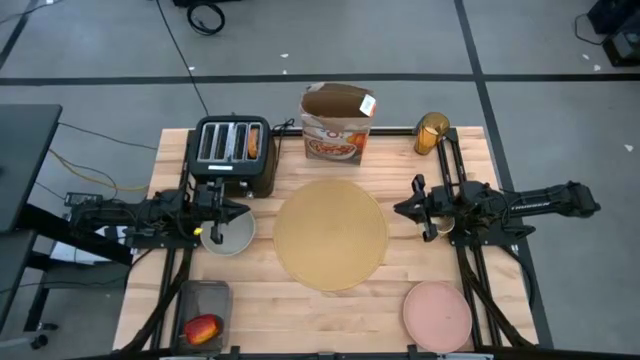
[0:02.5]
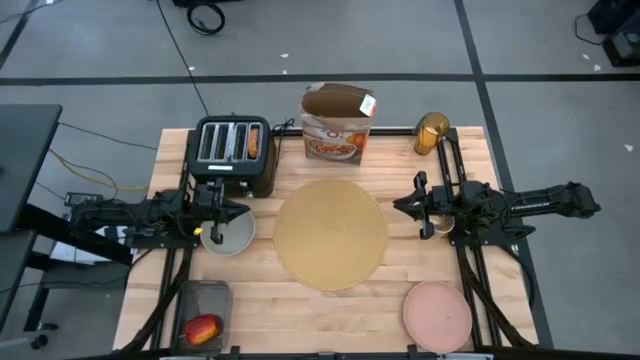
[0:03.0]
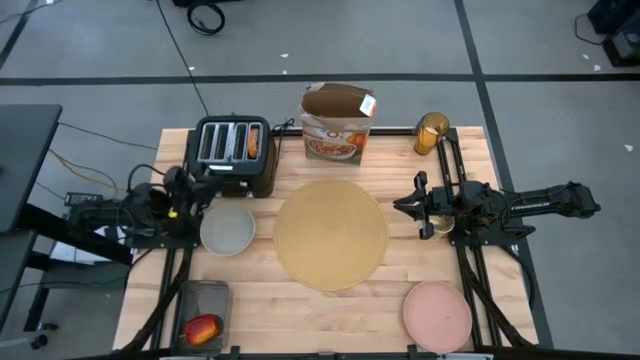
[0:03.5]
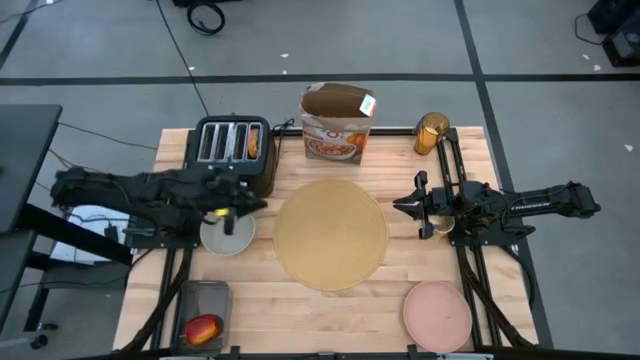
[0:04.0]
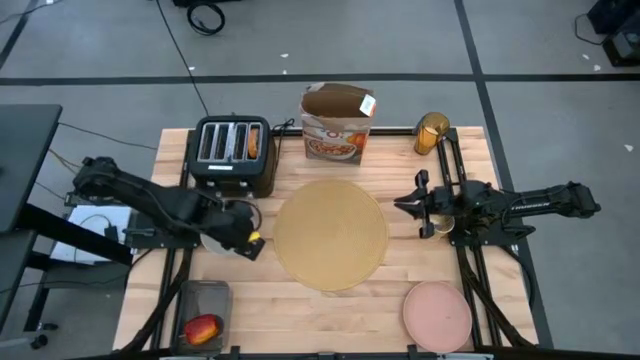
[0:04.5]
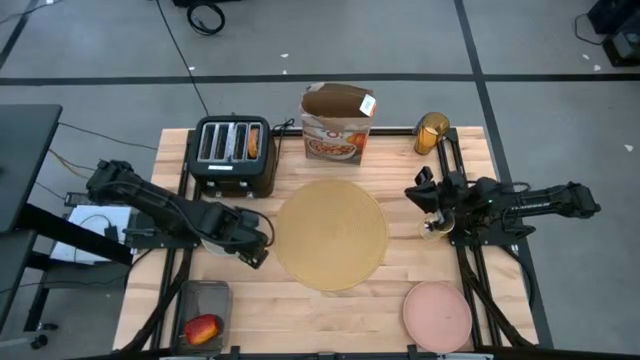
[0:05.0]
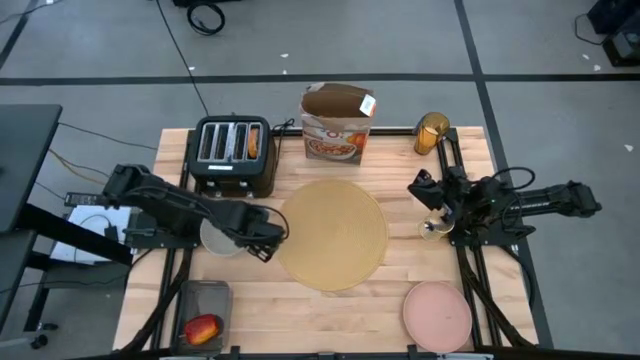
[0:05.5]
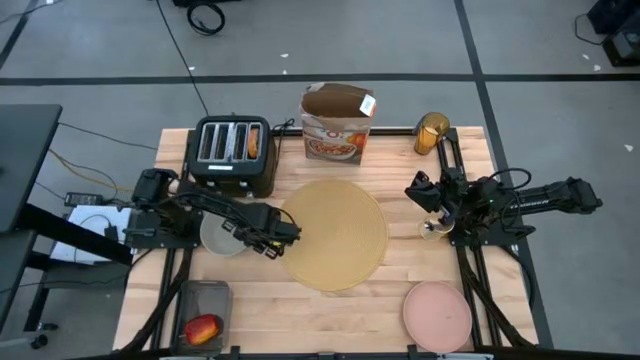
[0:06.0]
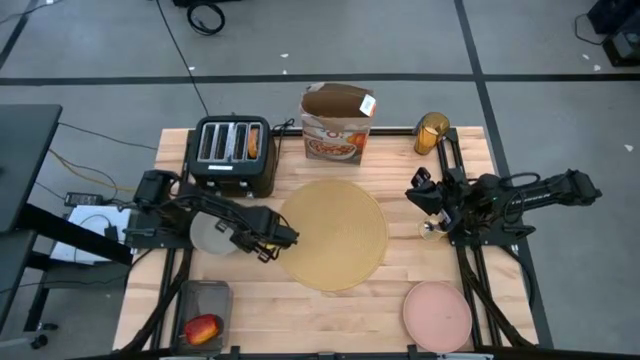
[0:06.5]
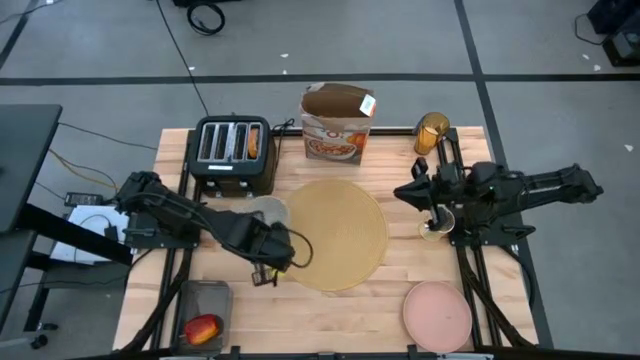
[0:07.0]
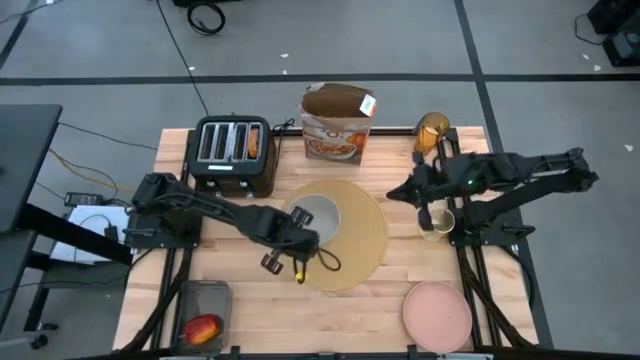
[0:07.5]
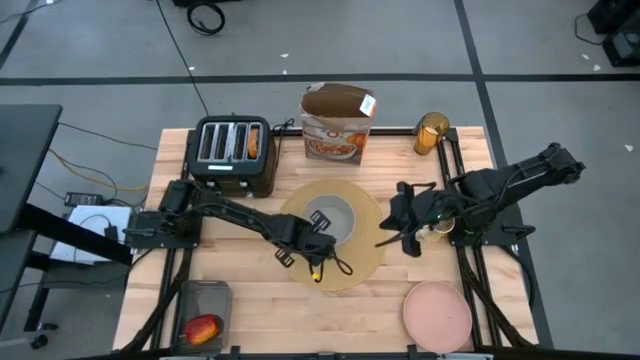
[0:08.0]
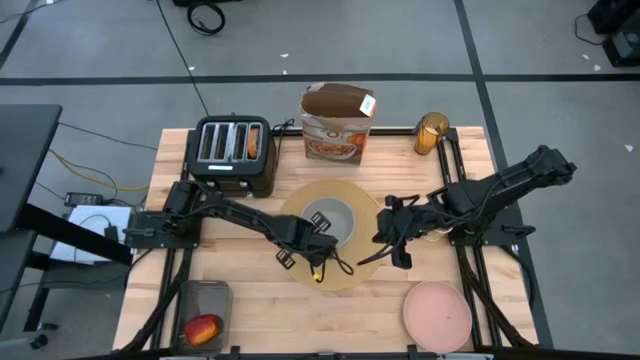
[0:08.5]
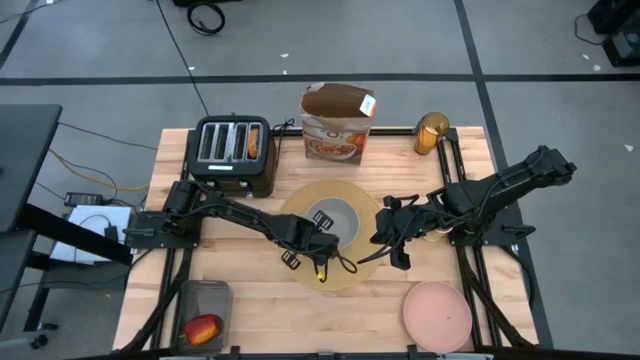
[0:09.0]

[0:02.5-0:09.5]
Task: Arrange a breakfast setting
Put the gray bowl on the brown table mat

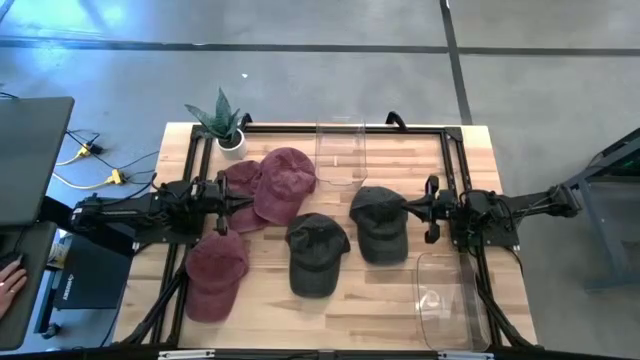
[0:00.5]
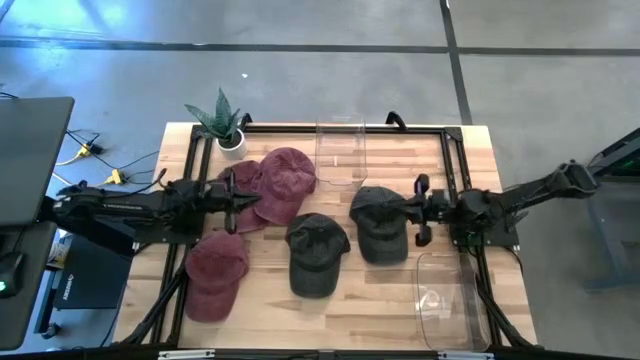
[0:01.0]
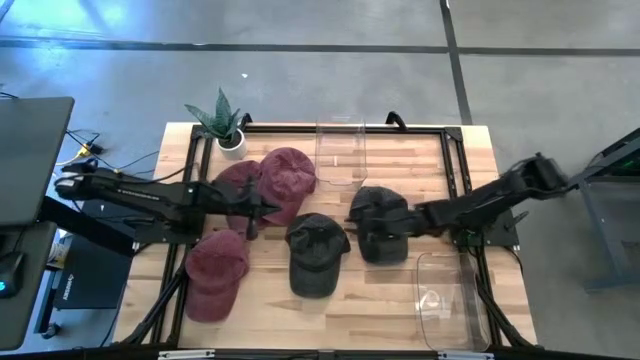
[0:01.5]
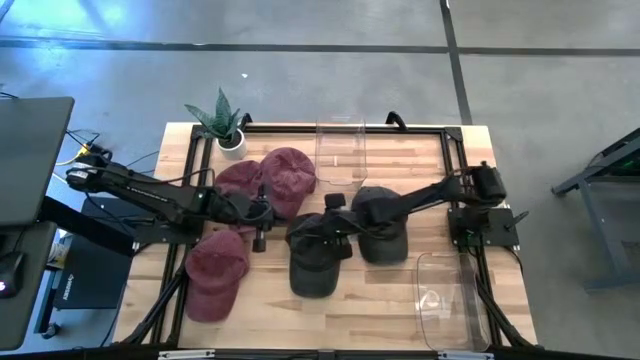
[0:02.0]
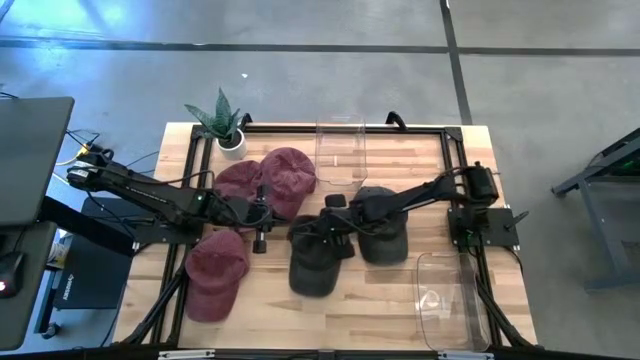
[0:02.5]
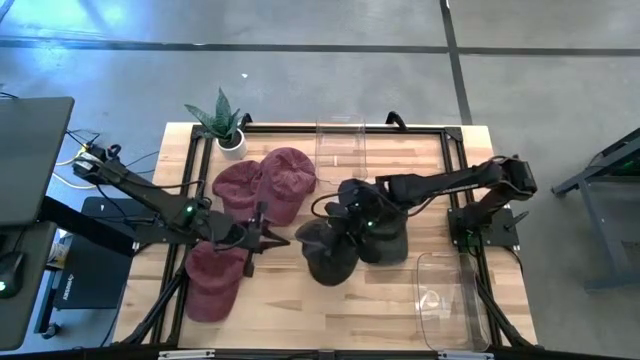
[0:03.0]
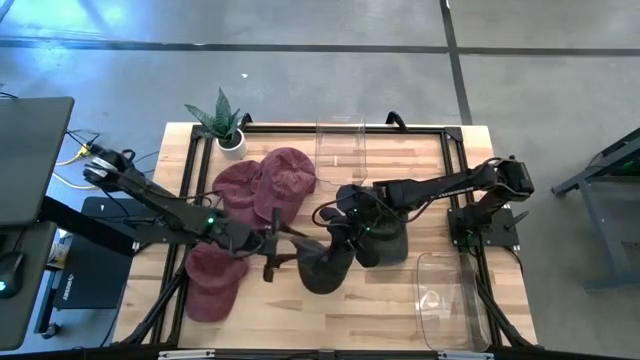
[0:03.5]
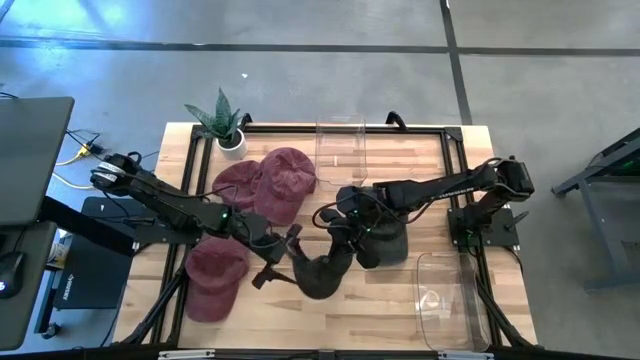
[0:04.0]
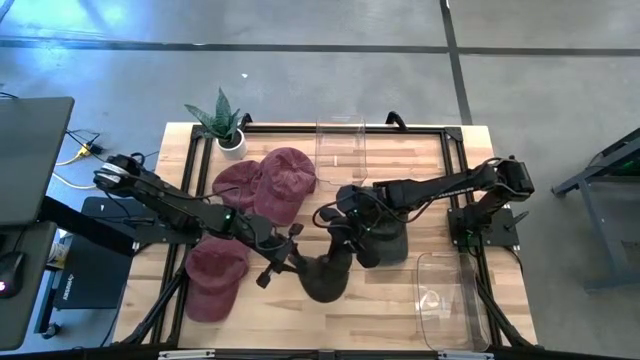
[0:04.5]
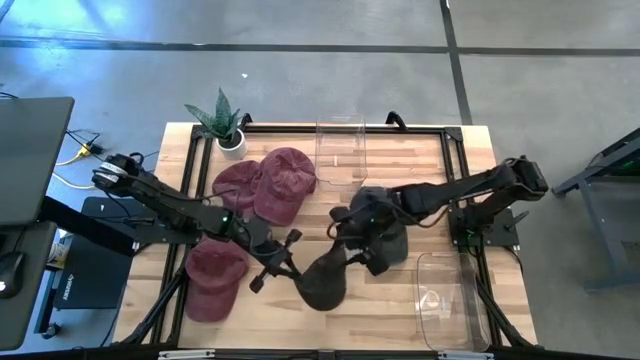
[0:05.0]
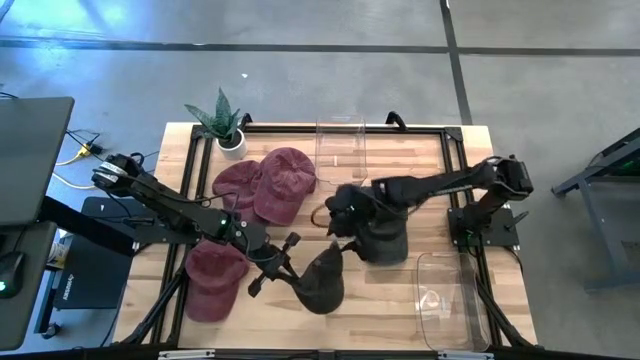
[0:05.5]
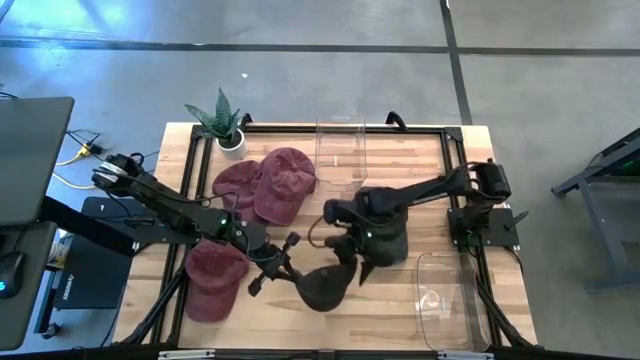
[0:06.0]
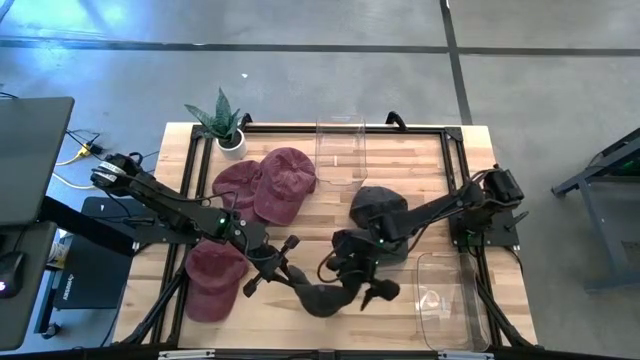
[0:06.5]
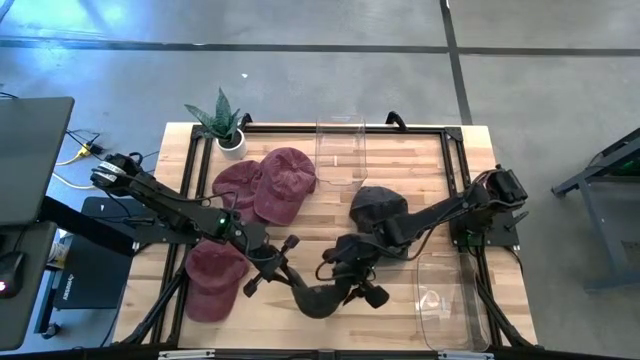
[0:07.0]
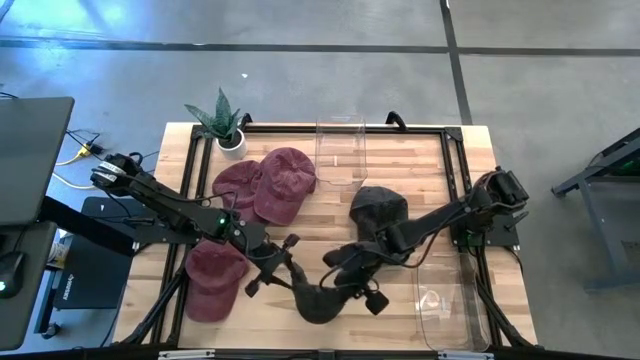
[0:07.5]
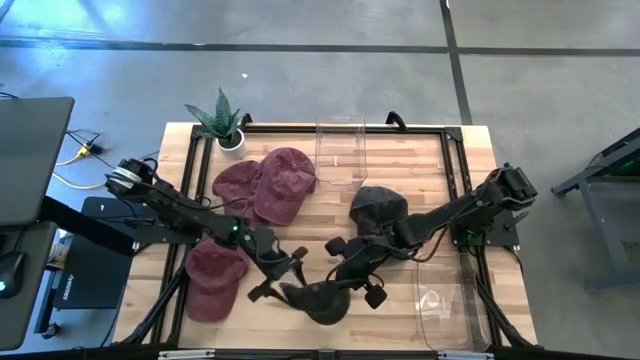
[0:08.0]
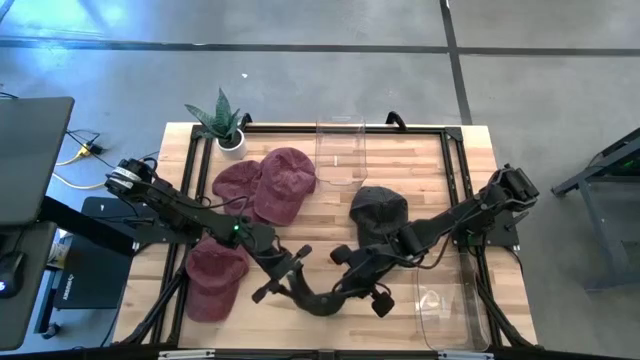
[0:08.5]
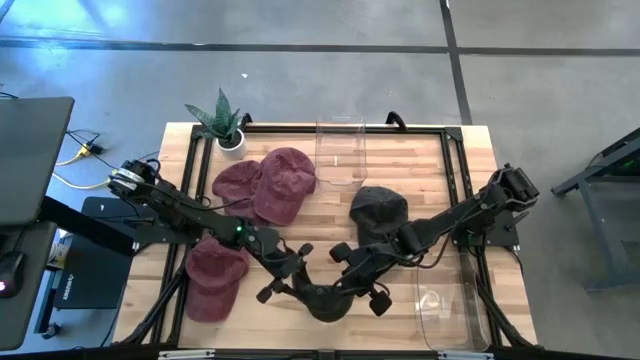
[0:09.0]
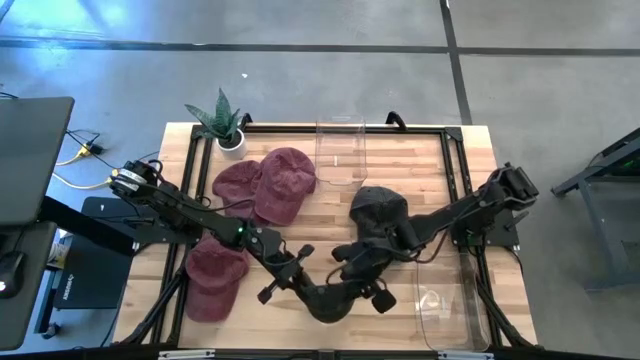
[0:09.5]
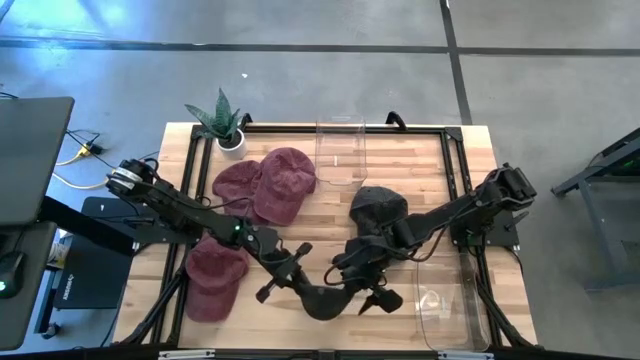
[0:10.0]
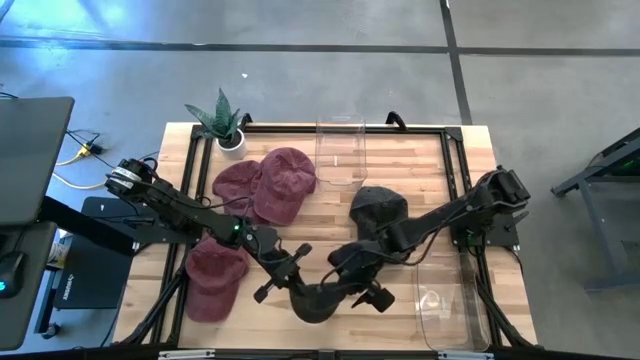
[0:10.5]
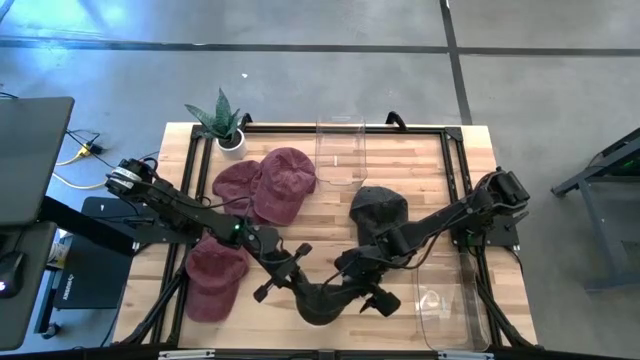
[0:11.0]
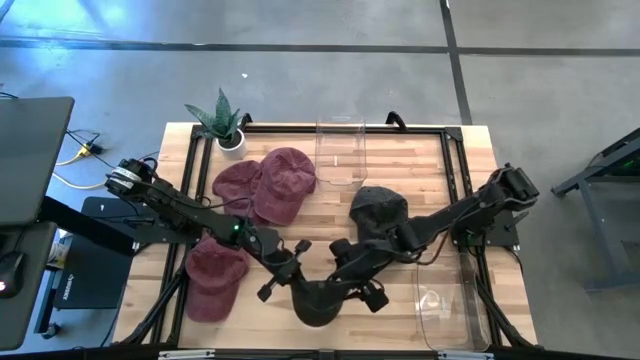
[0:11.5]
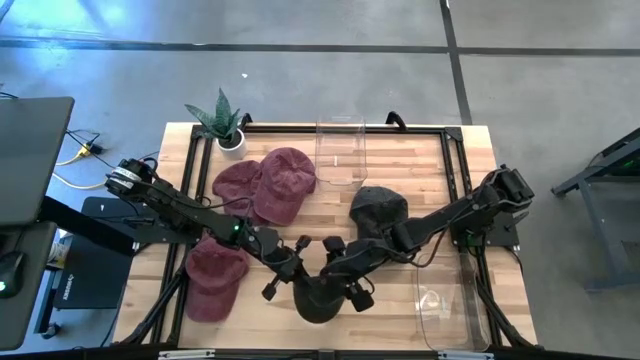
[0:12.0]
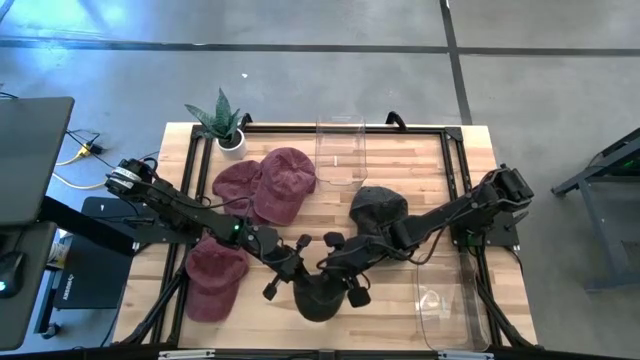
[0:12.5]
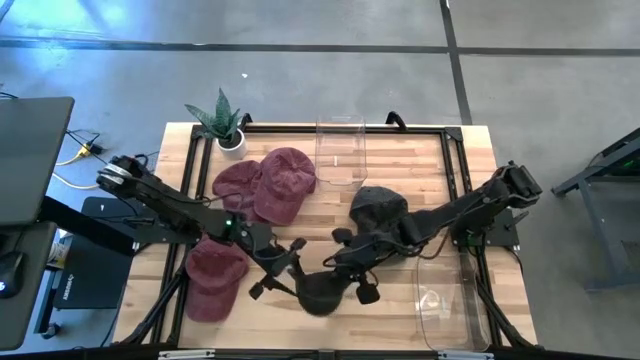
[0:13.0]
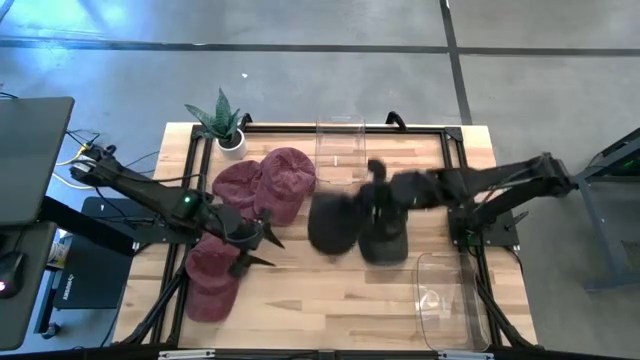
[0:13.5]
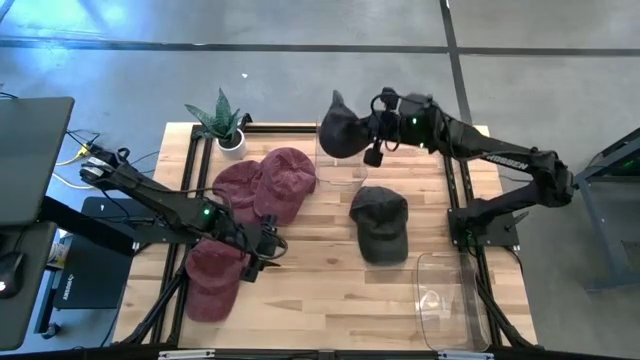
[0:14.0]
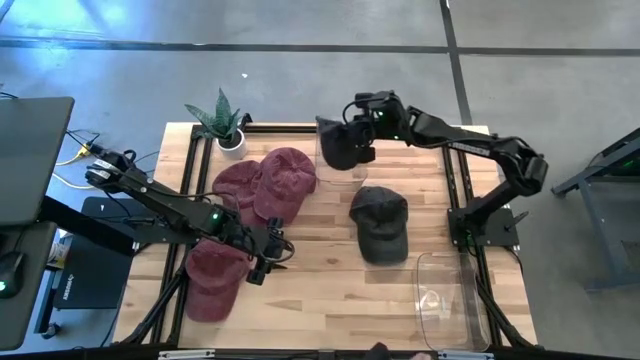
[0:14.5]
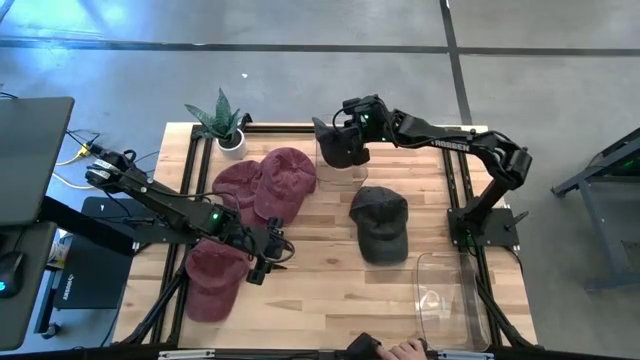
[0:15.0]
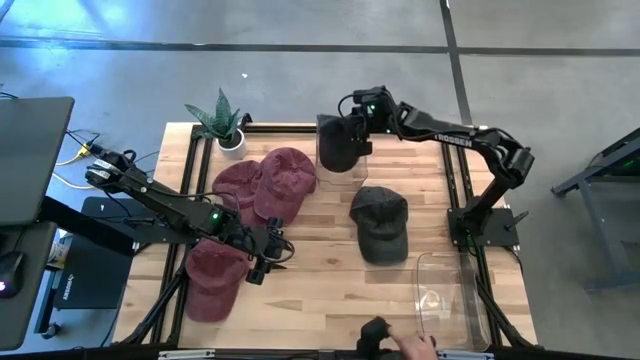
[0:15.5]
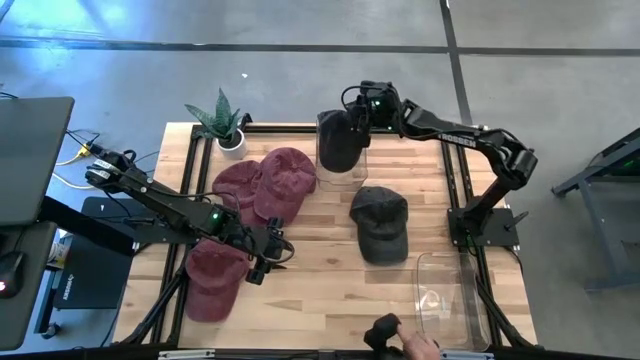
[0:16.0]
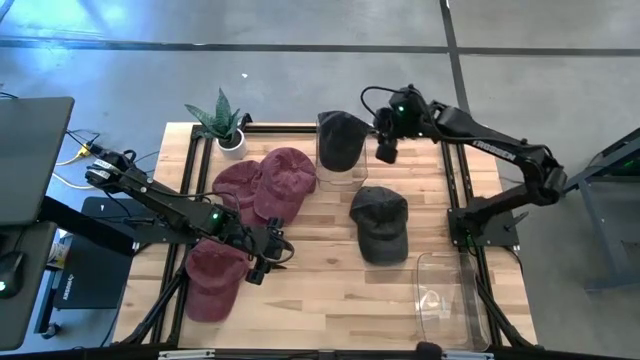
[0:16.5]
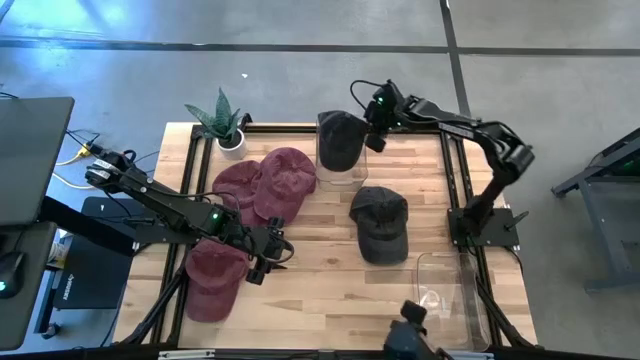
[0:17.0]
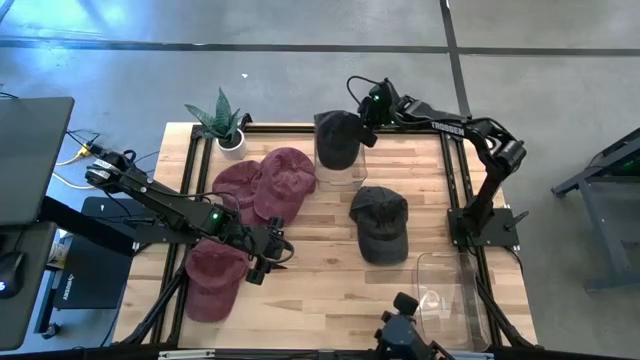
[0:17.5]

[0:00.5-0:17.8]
Task: Pick & Place hat
Put the left black cap into the top transparent bin
